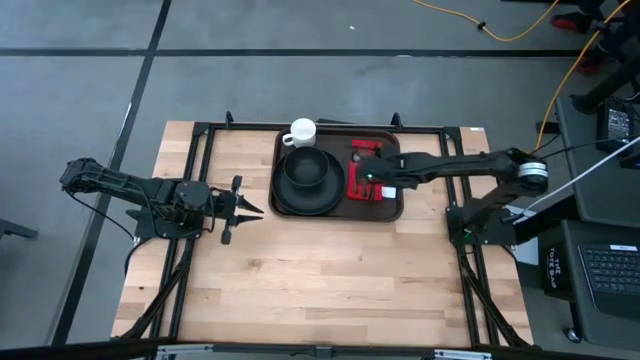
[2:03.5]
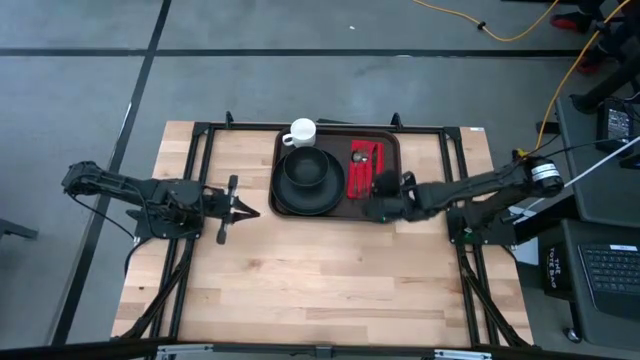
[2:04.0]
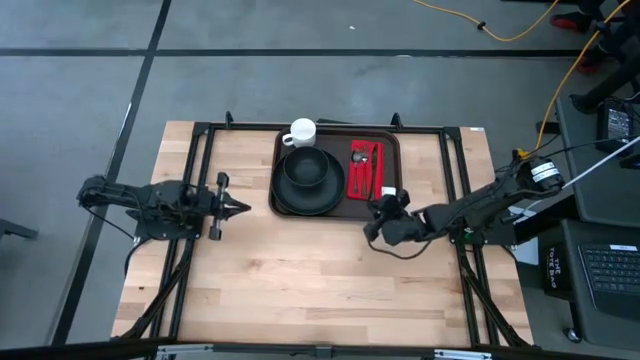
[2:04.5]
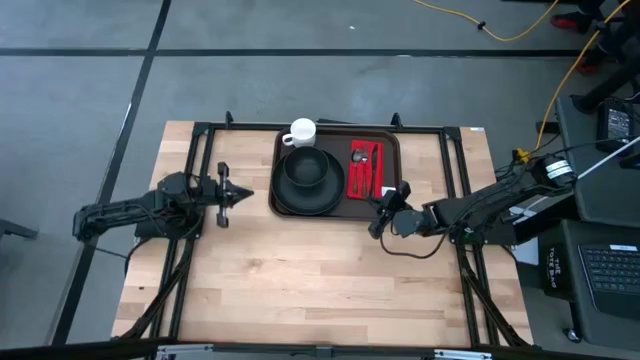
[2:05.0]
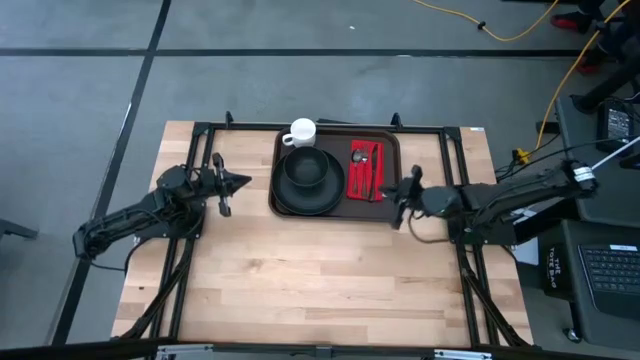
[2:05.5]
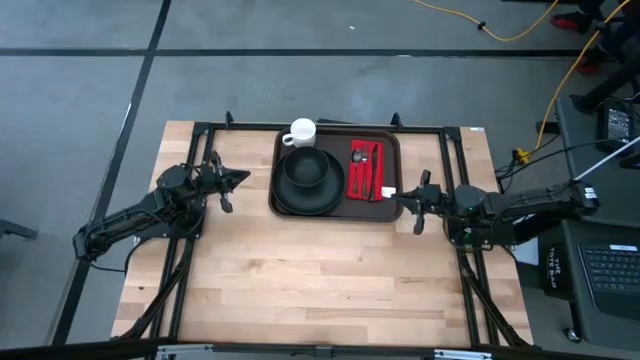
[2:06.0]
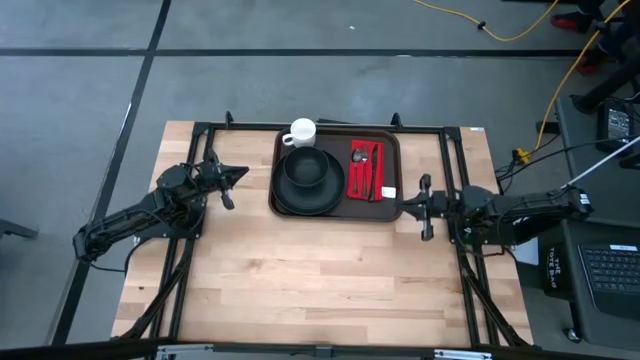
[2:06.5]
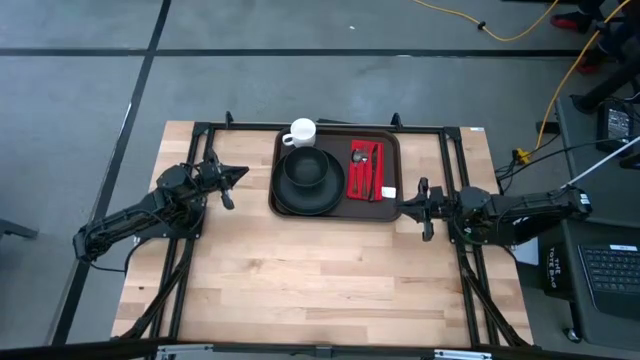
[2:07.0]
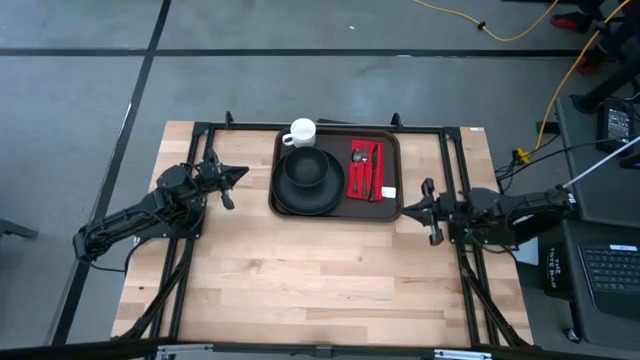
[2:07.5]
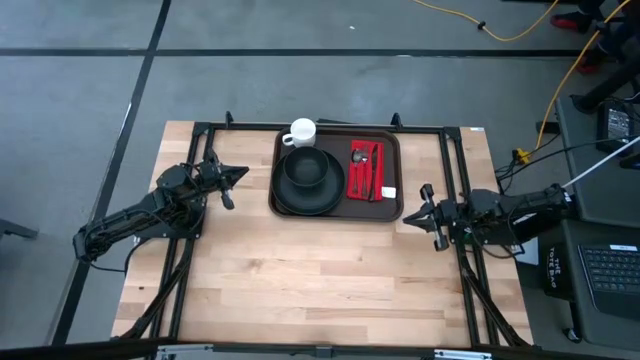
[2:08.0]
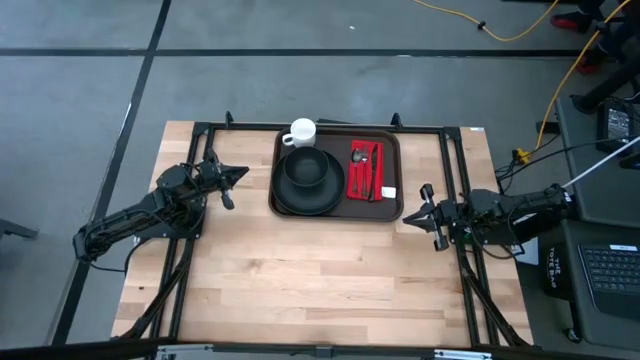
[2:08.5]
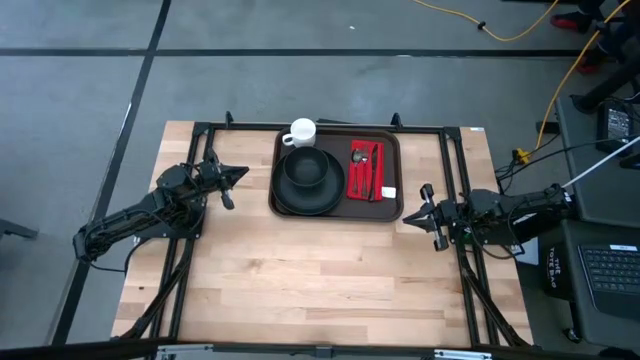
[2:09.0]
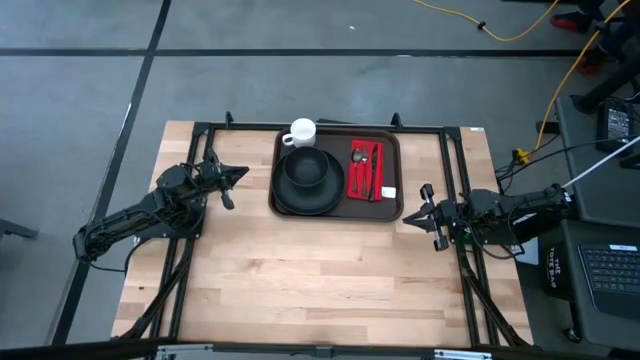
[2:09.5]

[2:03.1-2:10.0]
Task: Set up tray
Return to Home Position

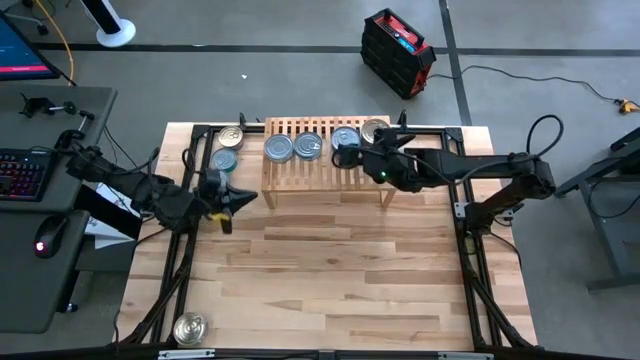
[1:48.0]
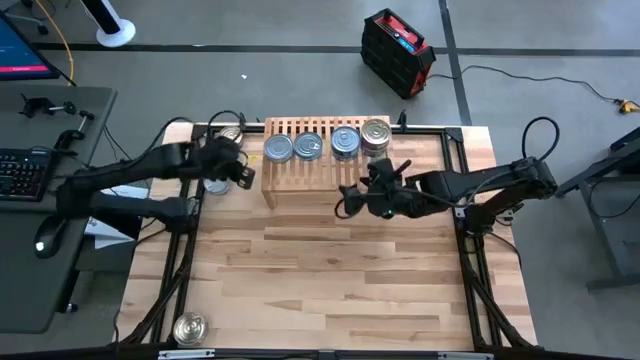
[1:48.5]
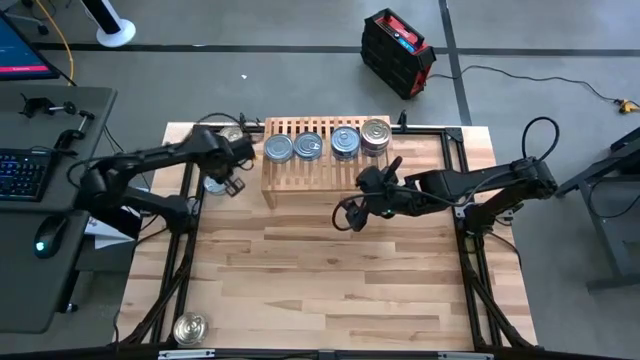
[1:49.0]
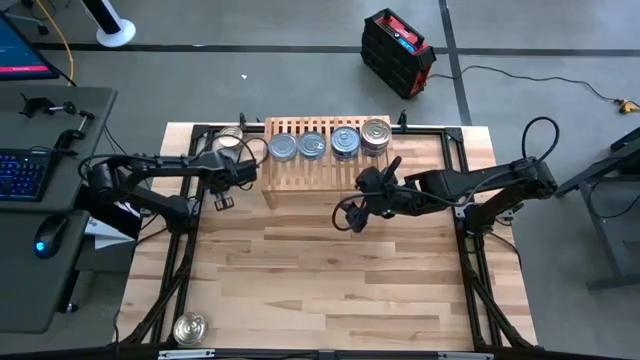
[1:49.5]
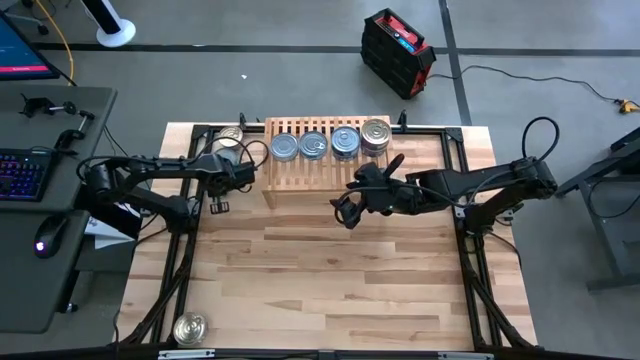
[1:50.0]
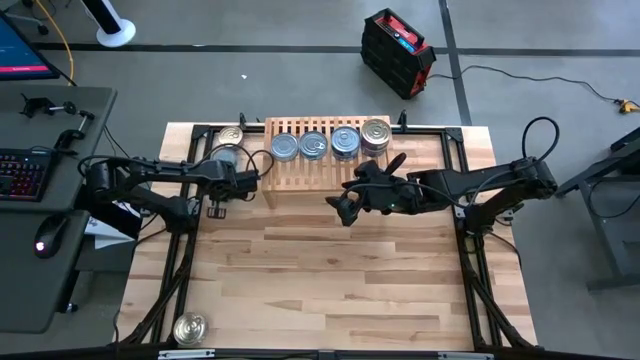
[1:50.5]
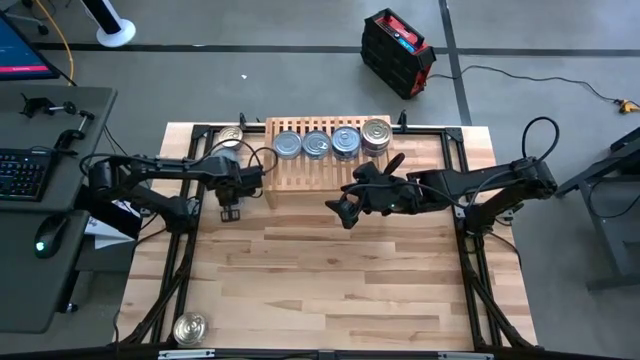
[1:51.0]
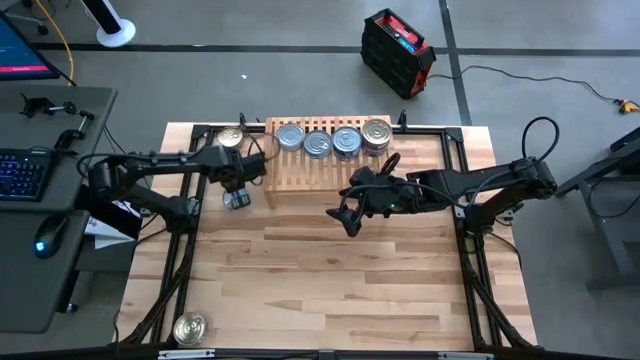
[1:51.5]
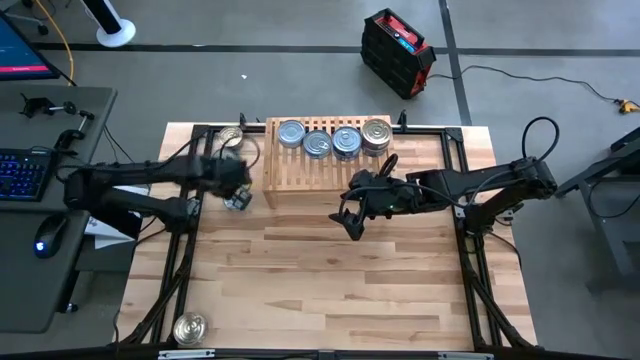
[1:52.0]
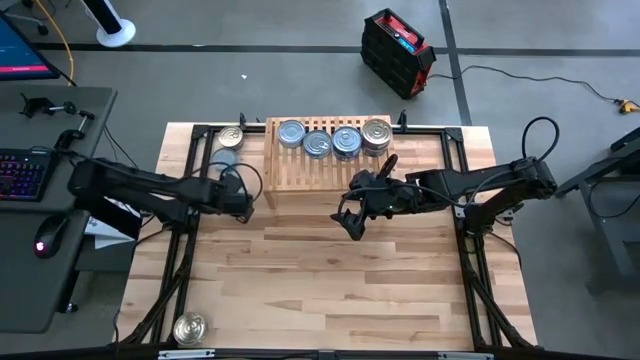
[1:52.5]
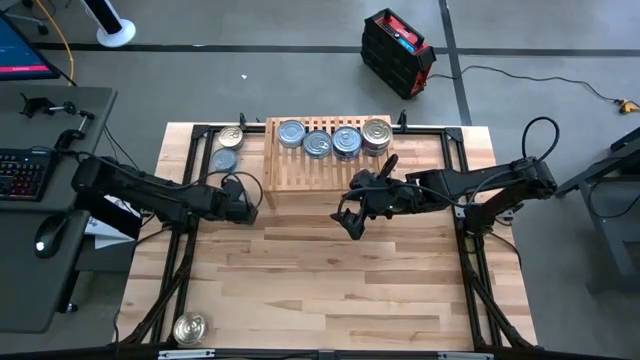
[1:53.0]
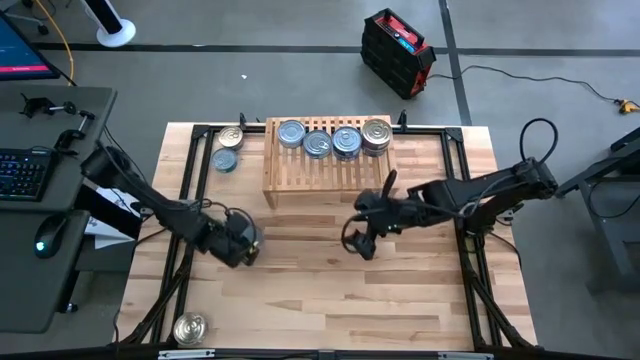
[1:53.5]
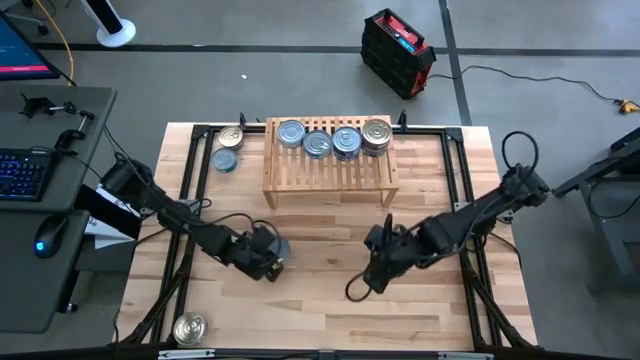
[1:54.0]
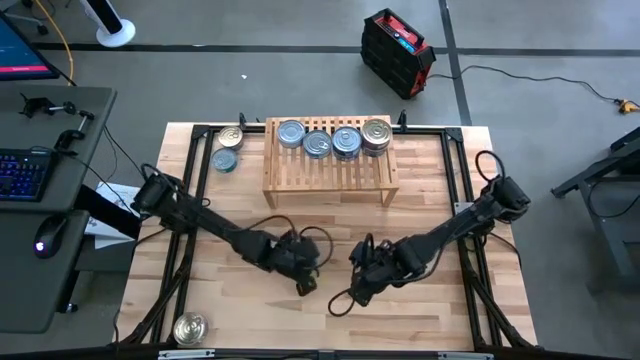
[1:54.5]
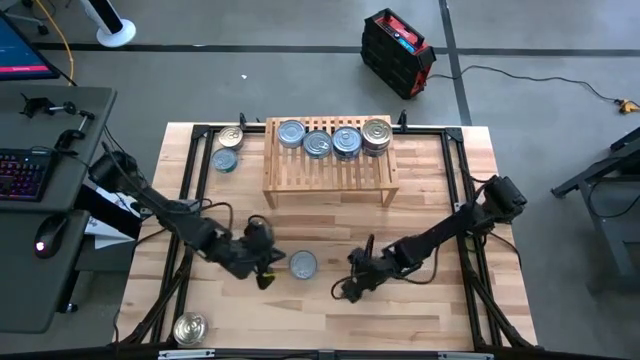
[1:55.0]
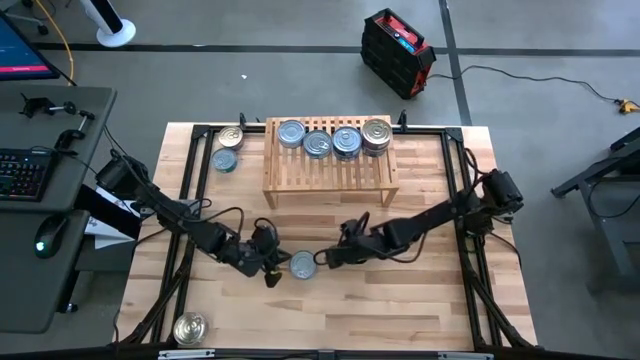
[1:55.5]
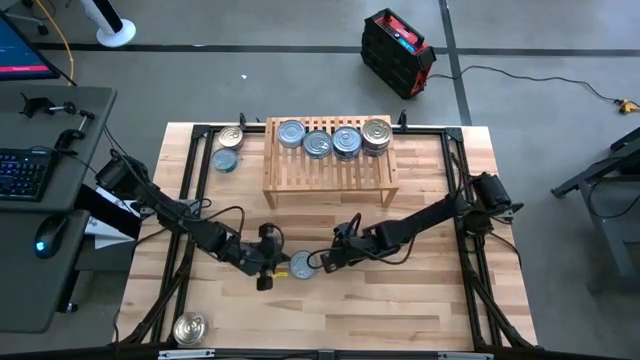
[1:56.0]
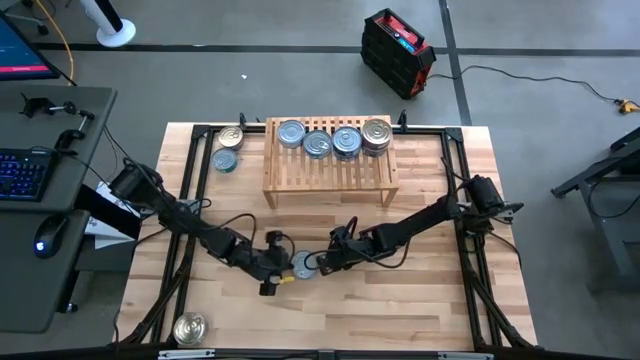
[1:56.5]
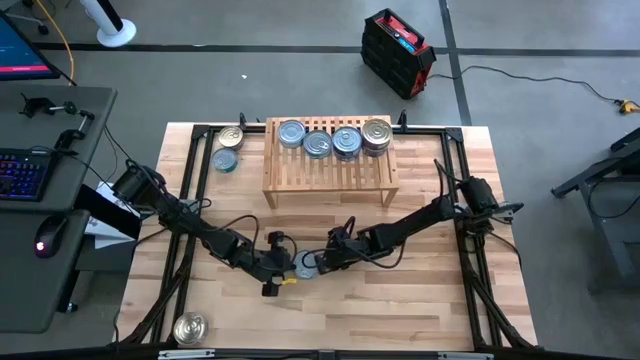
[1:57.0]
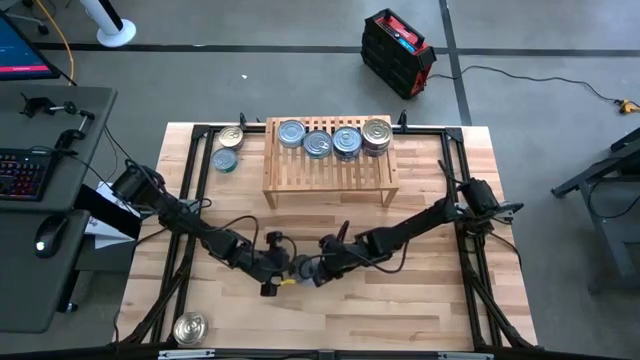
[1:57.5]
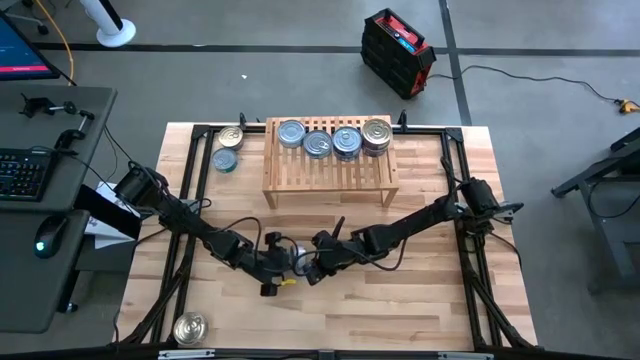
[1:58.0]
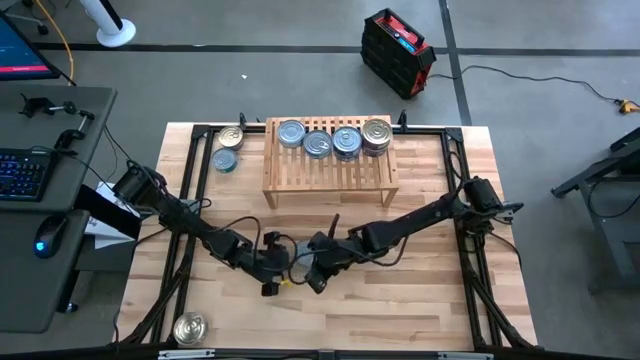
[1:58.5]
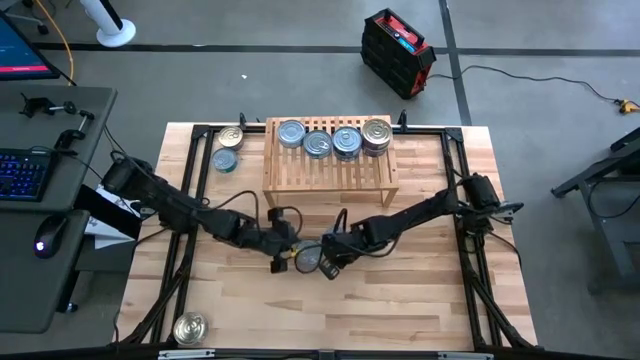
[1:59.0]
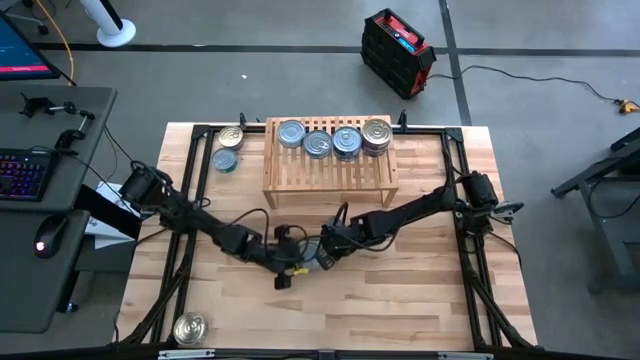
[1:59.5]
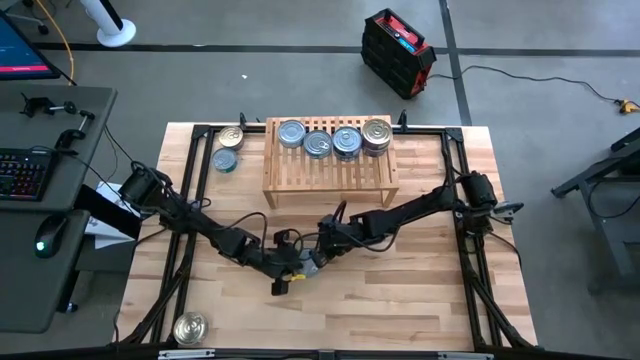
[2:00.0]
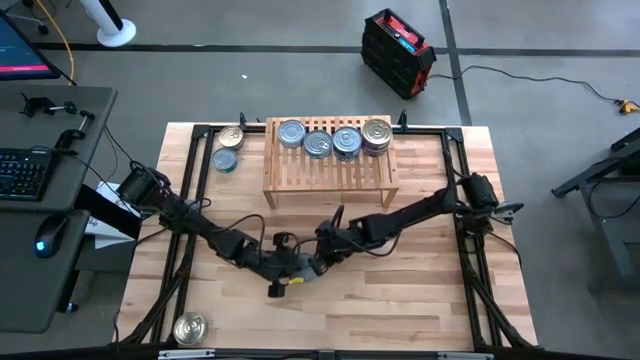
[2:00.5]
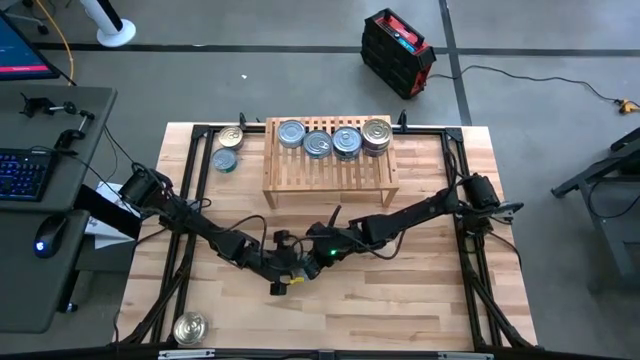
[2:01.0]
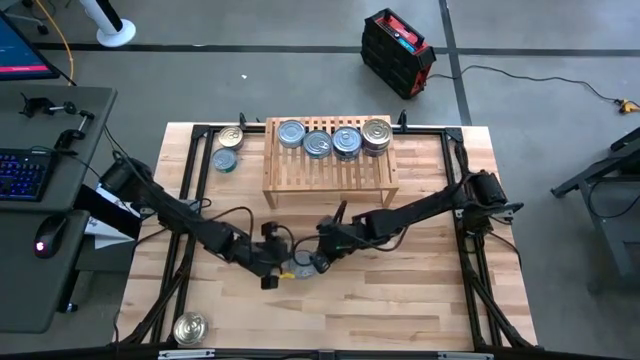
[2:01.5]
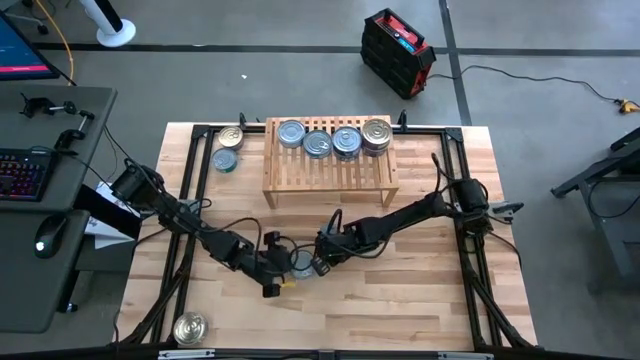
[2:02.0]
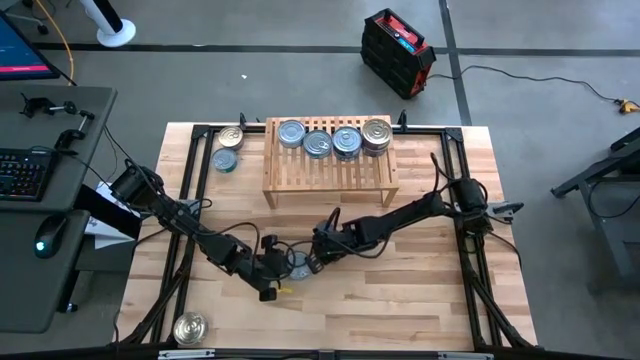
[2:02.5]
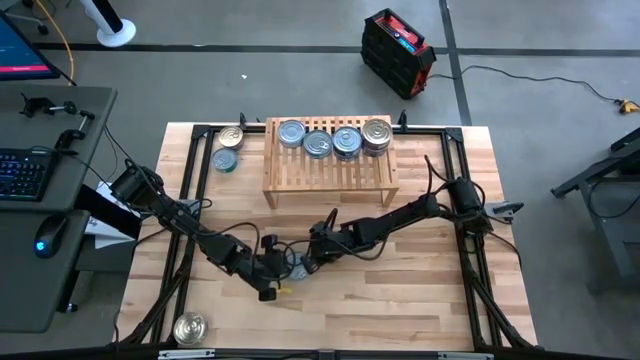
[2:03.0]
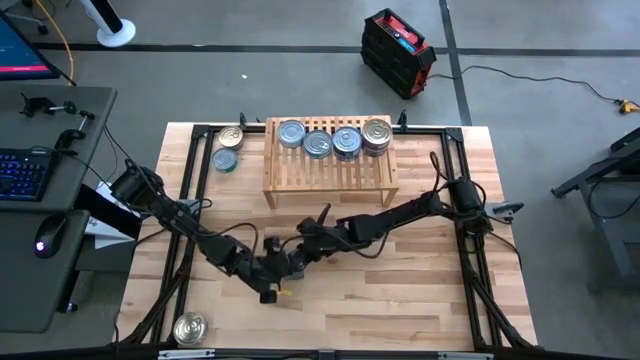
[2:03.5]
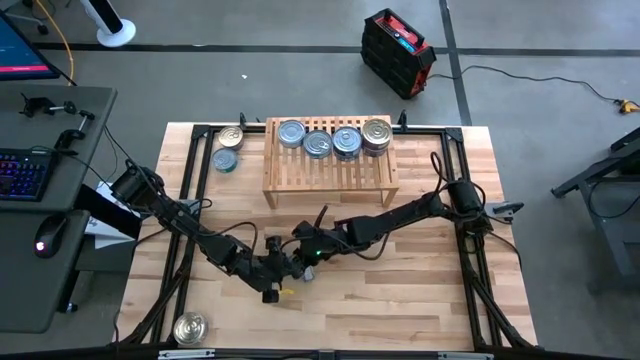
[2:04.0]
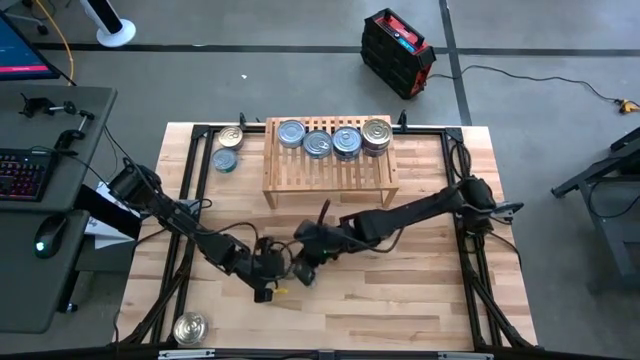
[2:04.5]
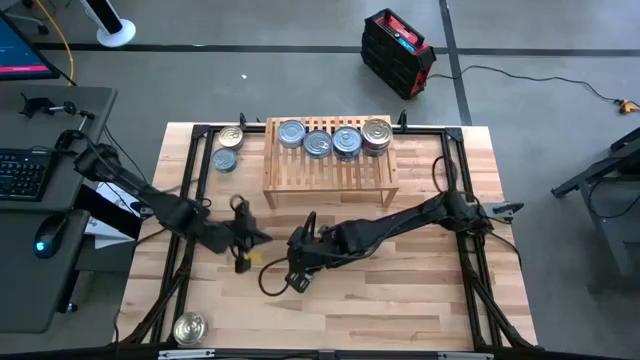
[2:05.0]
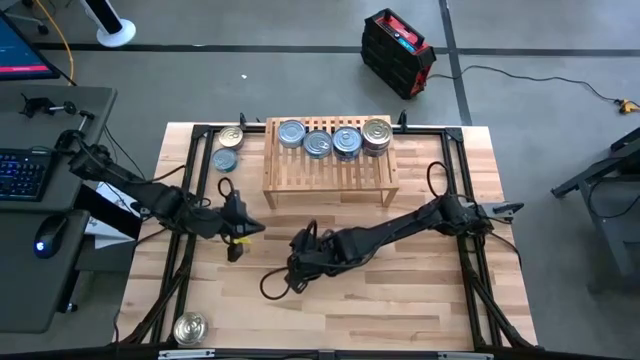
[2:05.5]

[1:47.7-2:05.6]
Task: Stack canned seafood by type on shelf
Stack the blue tuna can on the stacked blue tuna cans on the shelf
